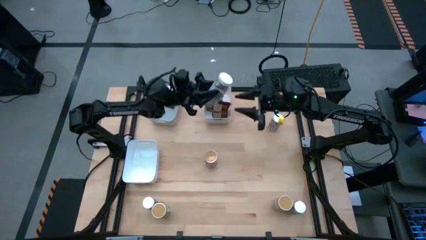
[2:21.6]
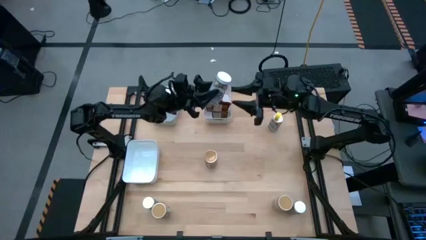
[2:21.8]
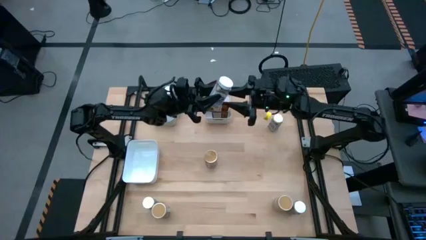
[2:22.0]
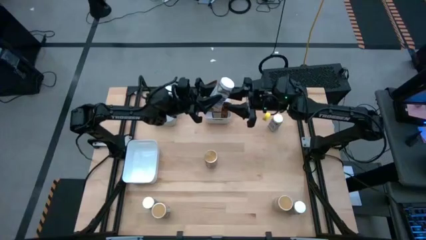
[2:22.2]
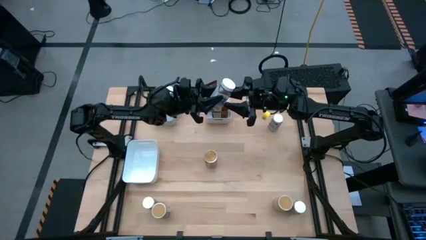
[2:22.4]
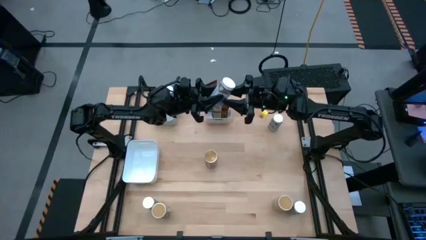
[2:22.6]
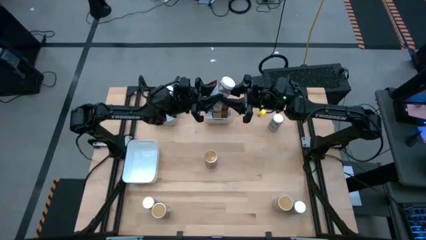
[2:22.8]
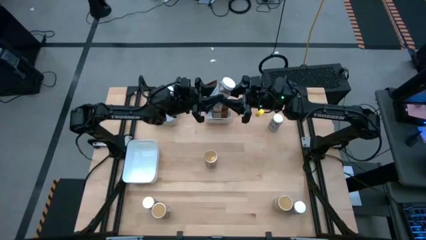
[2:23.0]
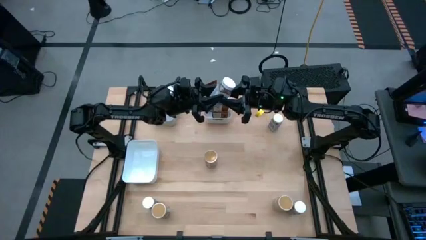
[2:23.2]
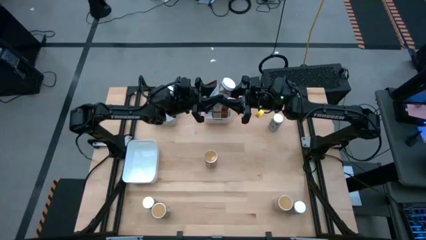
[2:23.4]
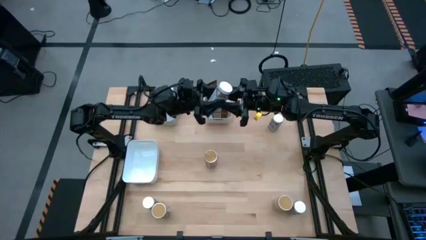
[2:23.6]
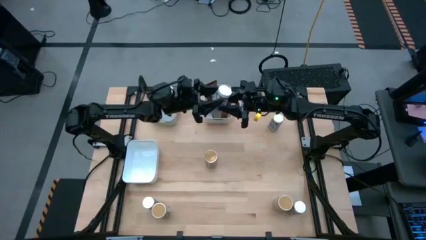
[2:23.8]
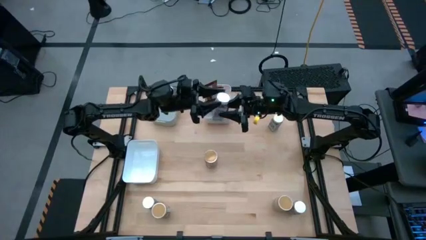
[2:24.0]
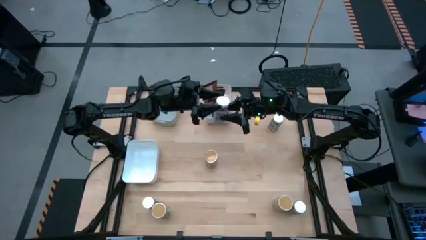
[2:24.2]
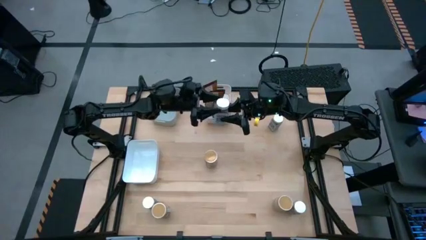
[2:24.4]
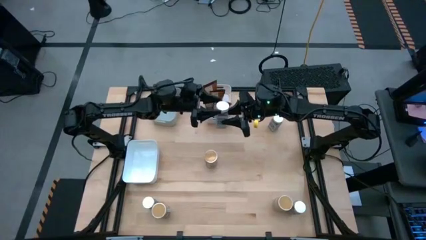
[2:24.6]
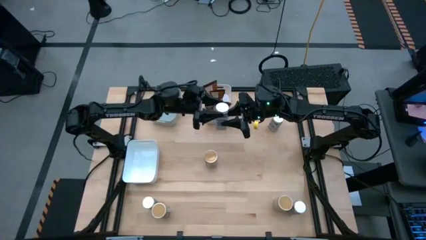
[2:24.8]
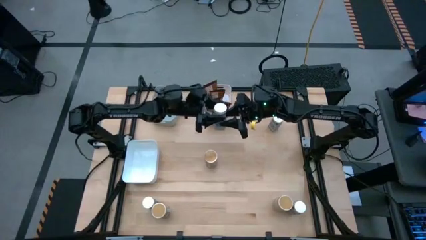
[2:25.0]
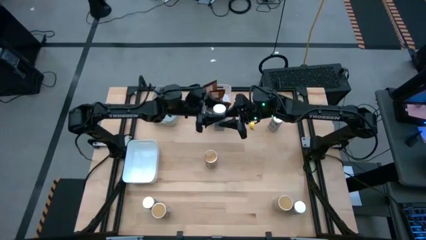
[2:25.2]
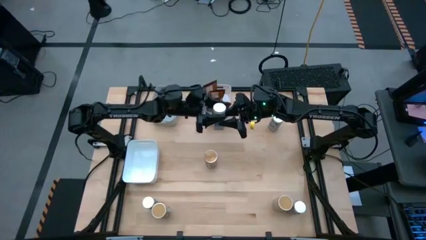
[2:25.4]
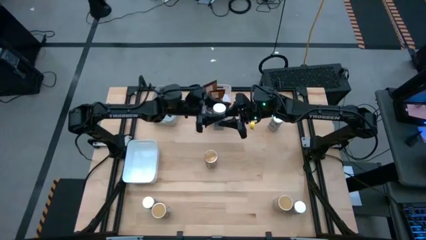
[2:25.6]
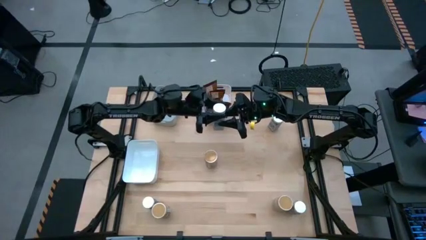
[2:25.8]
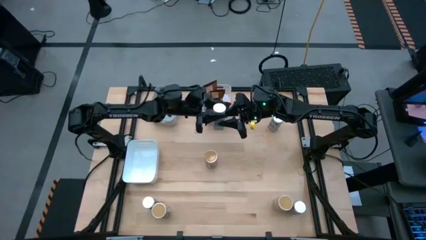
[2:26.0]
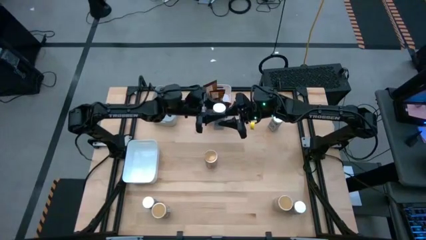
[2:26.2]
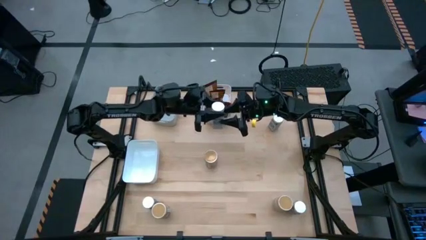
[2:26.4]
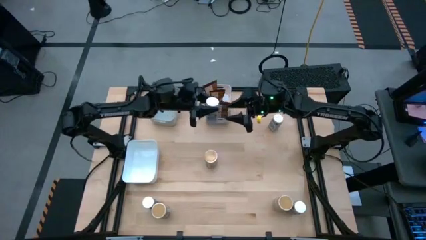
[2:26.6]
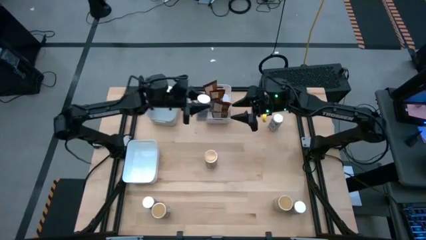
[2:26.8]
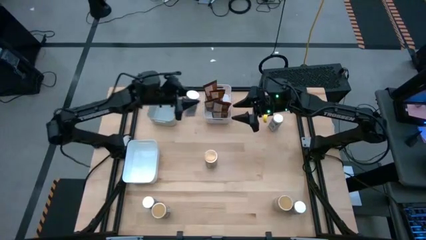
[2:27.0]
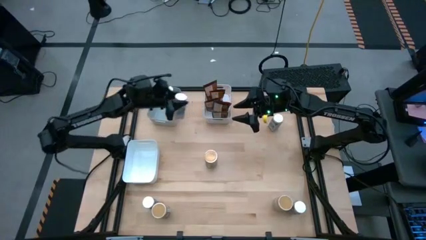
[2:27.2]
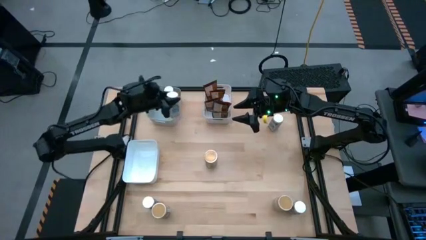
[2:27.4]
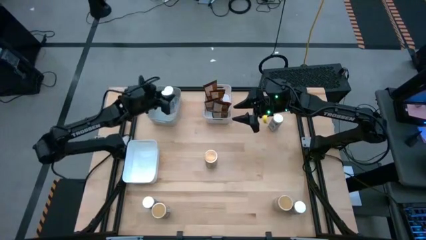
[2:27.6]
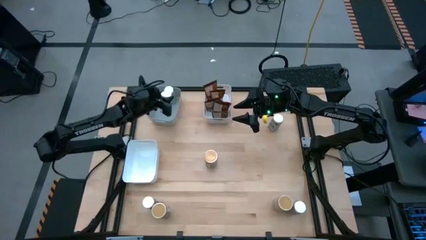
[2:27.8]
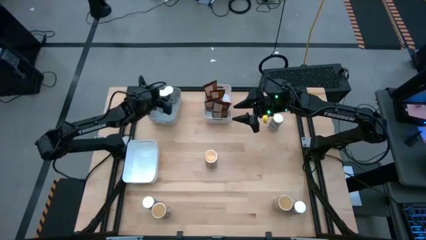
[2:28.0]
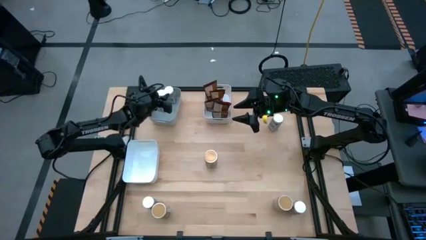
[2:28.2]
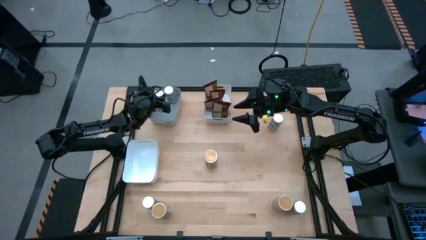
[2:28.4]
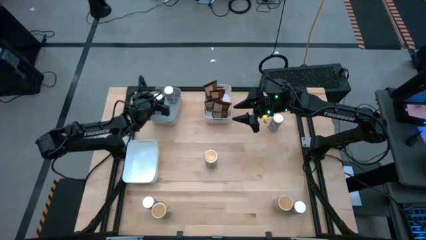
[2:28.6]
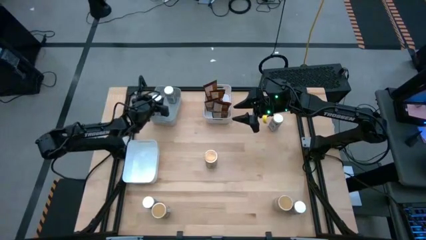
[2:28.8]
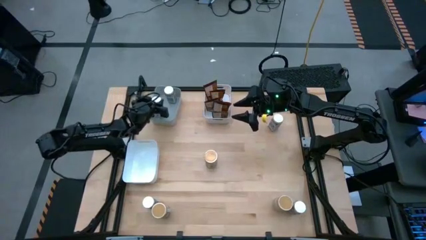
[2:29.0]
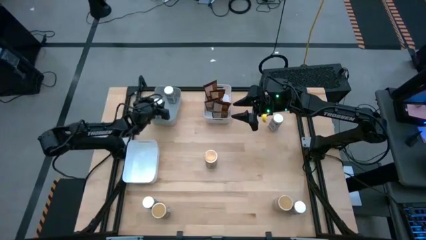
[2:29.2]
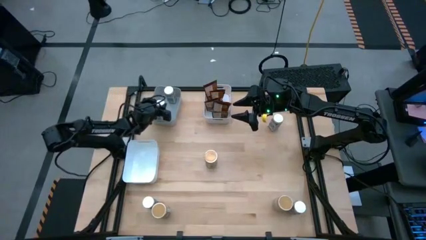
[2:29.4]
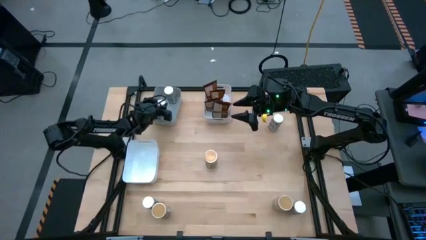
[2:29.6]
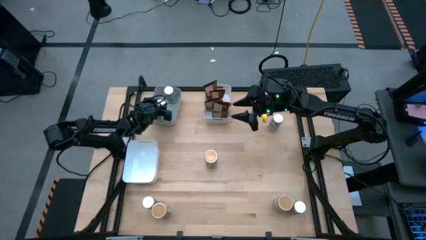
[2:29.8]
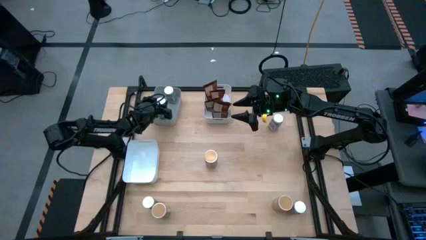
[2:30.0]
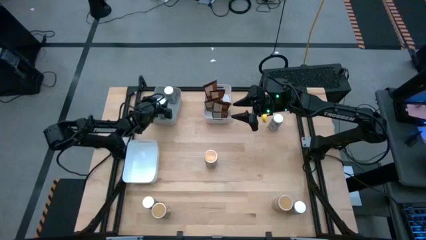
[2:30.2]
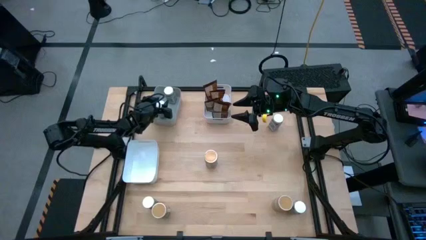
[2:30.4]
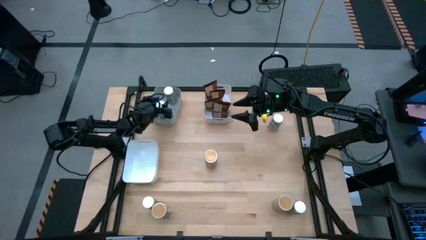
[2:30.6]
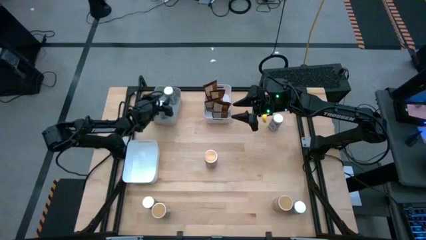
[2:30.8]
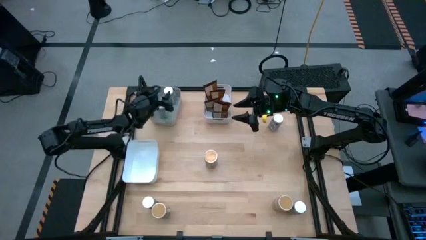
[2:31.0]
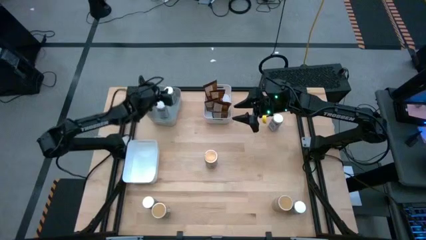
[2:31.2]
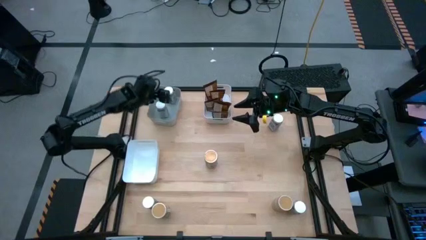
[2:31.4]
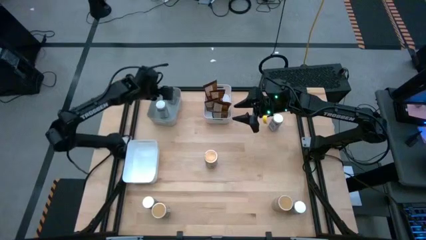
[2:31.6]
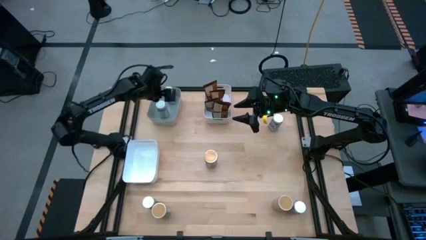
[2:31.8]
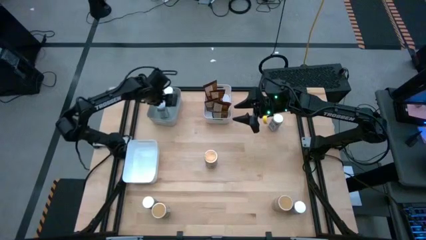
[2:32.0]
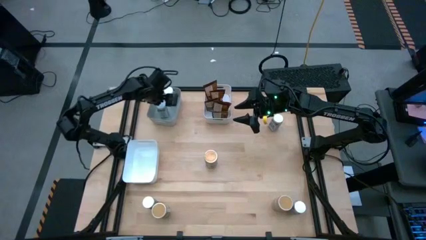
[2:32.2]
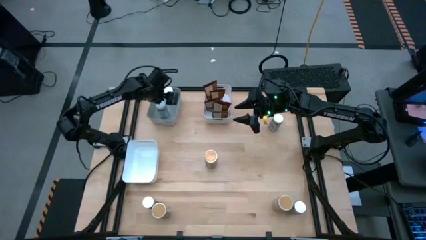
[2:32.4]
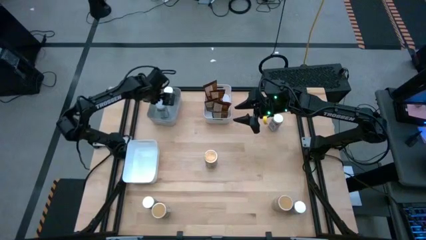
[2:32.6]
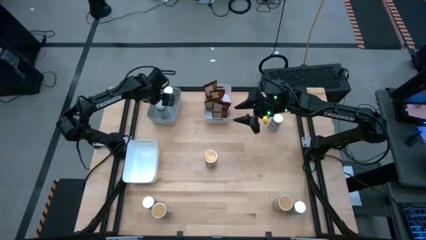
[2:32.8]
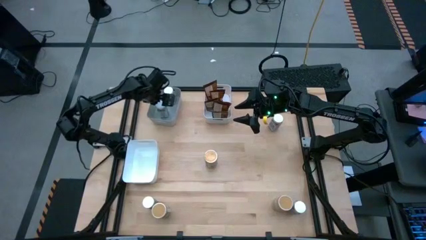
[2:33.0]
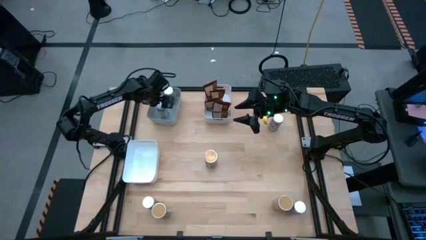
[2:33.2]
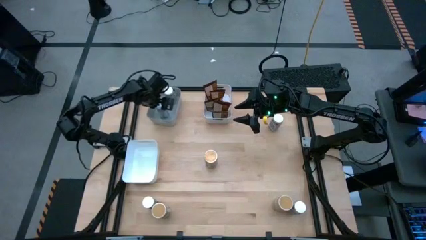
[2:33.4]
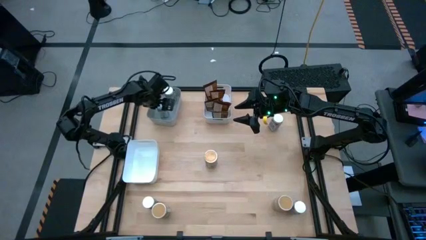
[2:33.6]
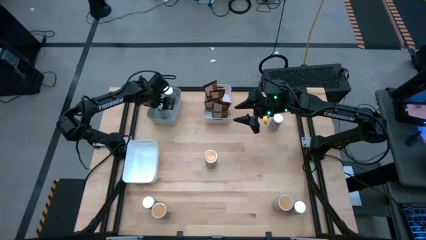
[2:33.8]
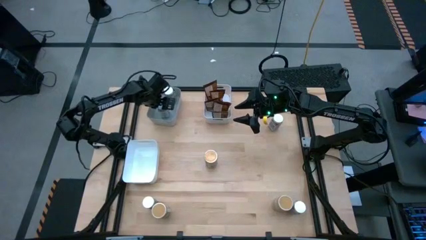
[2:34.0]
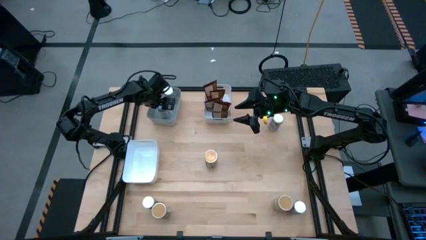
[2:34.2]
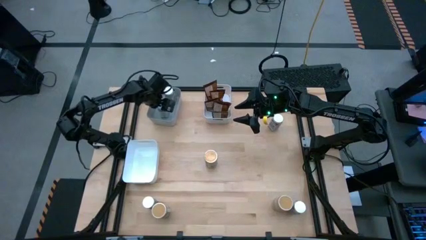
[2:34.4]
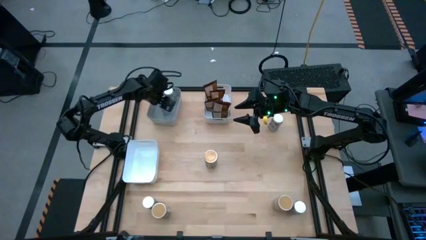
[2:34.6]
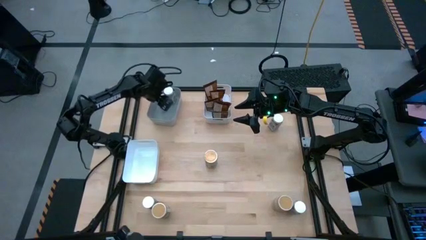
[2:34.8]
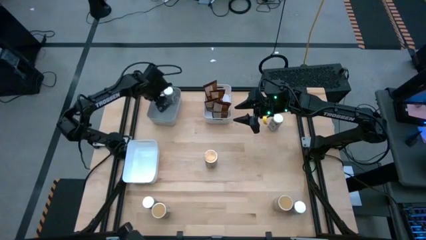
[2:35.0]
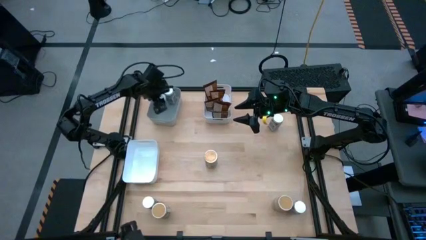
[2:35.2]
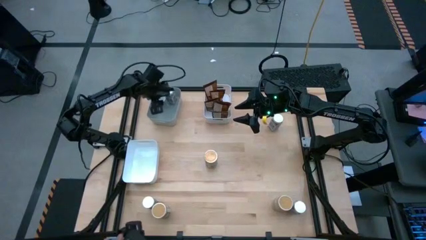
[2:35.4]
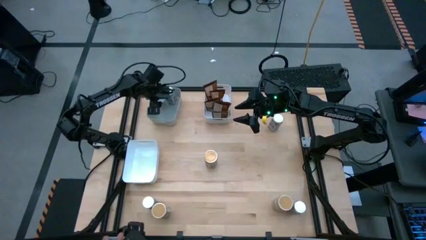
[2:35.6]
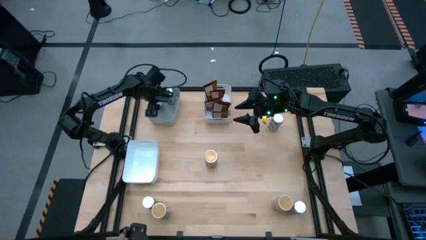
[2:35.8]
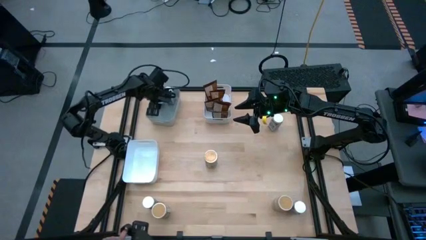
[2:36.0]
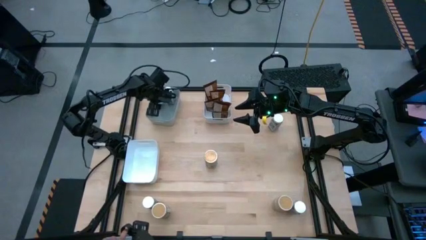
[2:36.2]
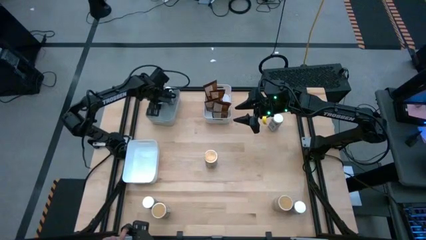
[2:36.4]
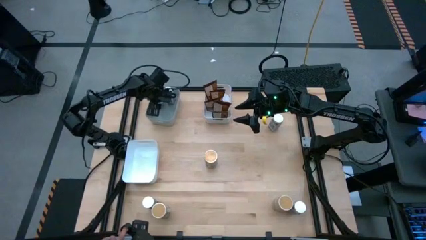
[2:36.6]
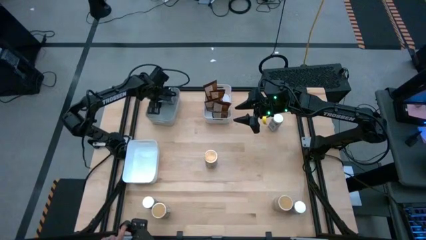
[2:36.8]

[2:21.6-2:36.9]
Task: Sort spices by type
Put the white seasoning bottle into the gray bin

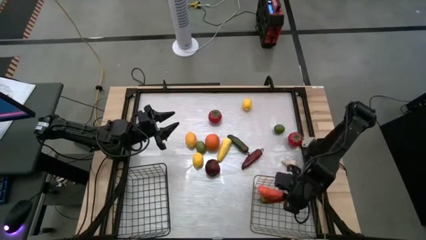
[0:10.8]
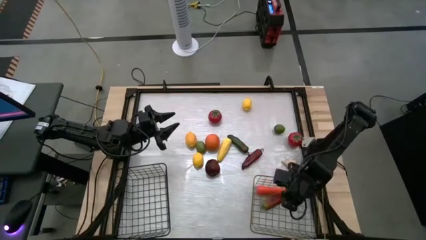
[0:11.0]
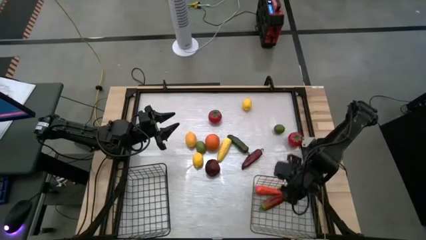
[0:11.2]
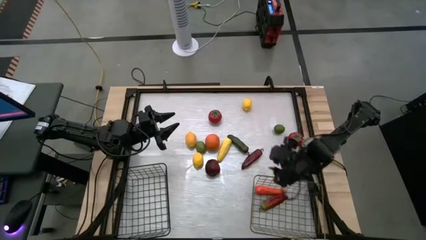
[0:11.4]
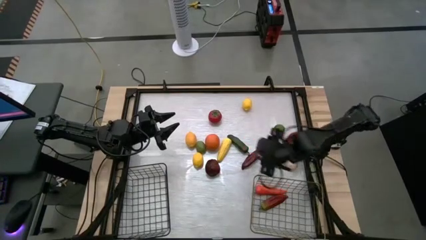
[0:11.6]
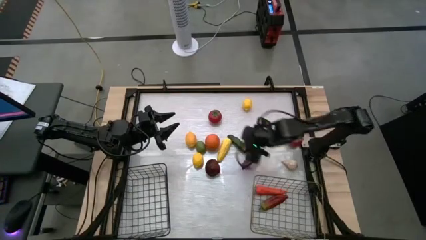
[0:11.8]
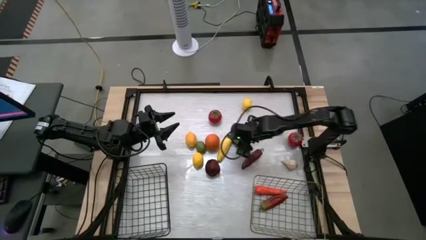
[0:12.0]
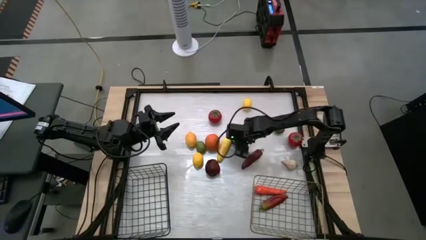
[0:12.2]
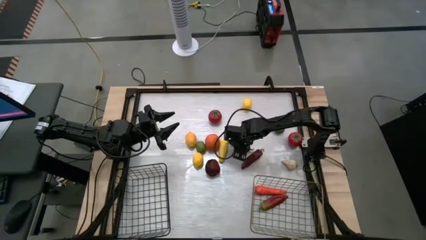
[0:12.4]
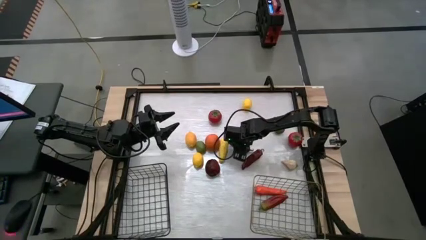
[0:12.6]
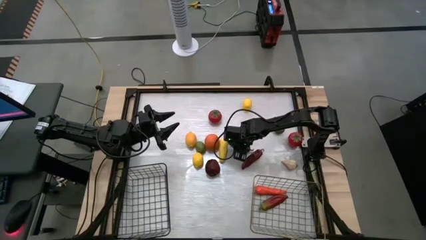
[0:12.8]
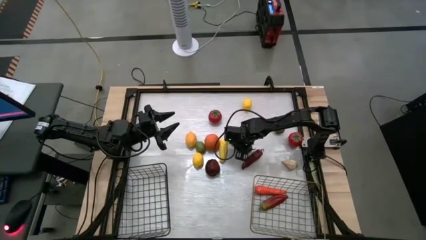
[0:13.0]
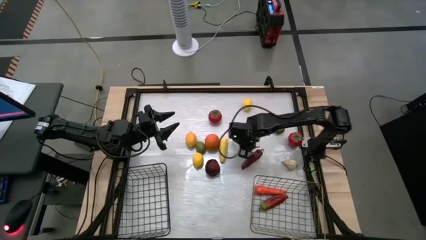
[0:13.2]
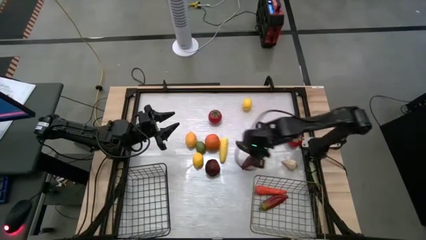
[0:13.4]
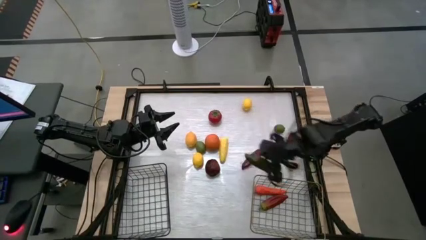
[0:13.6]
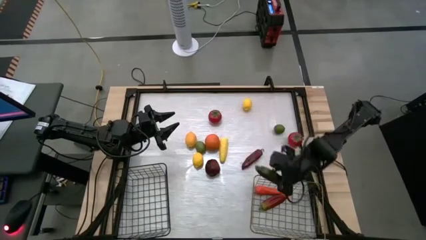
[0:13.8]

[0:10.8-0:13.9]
Task: Sort produce into baskets
Put the green bell pepper into the gold wire basket
